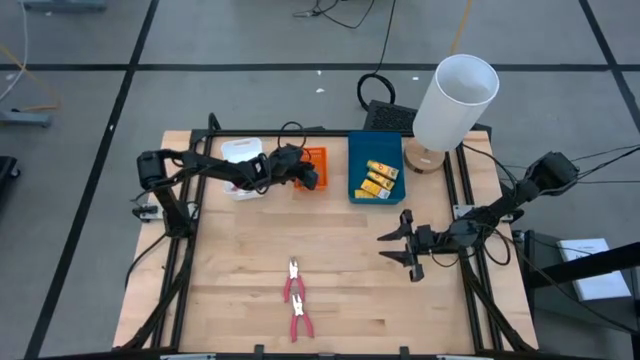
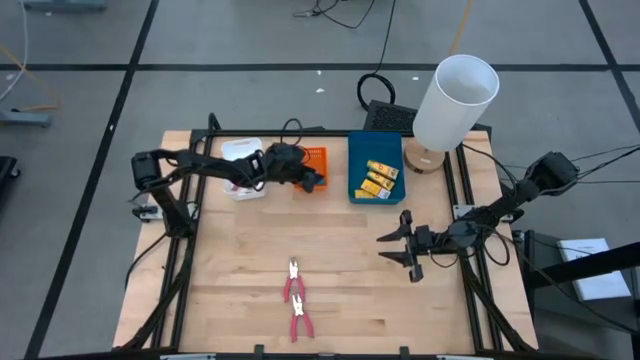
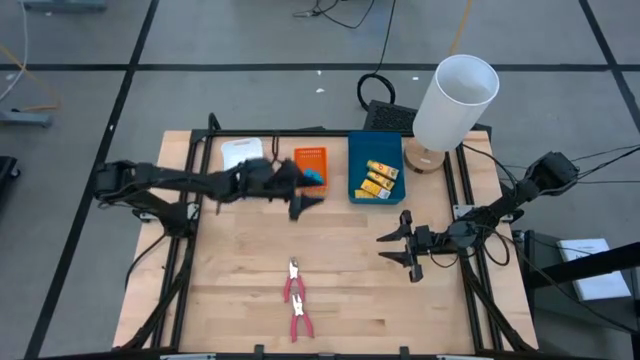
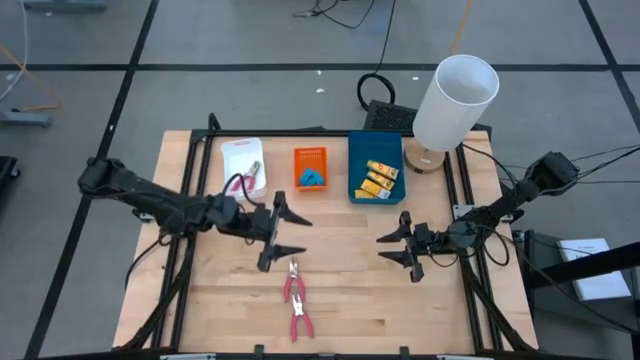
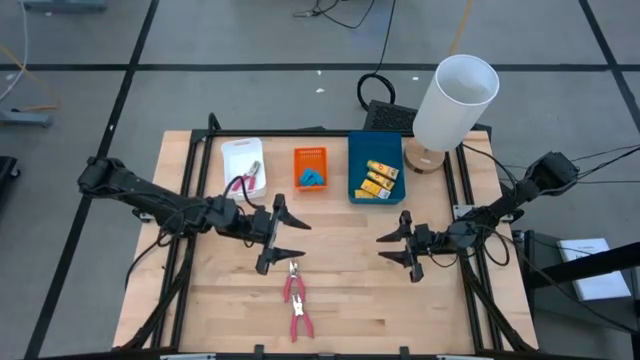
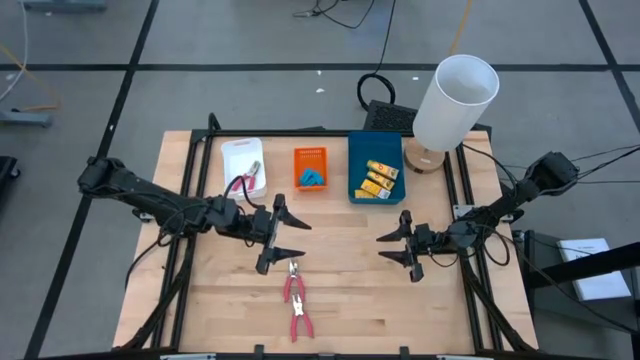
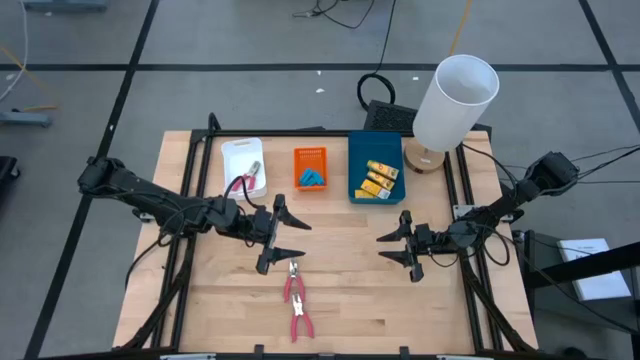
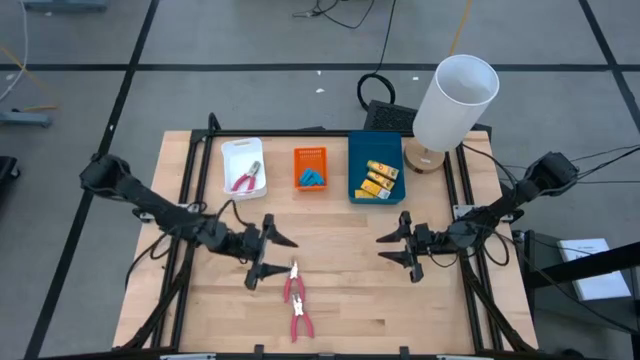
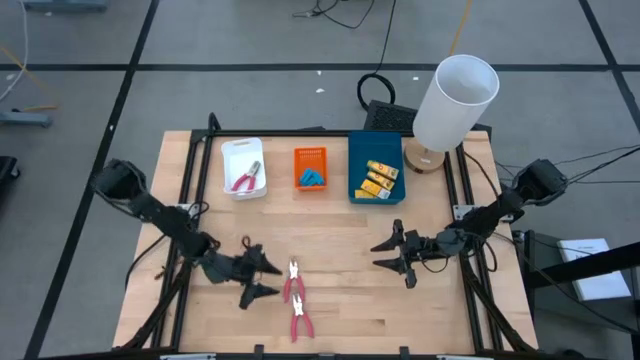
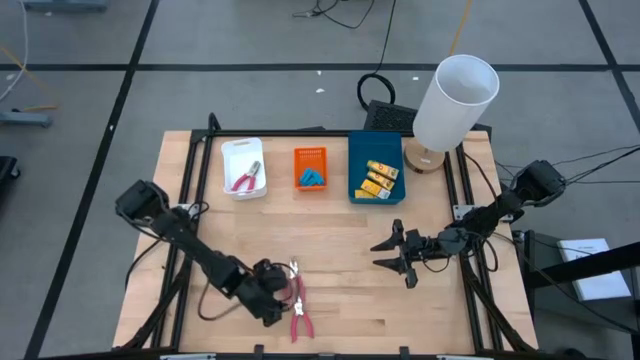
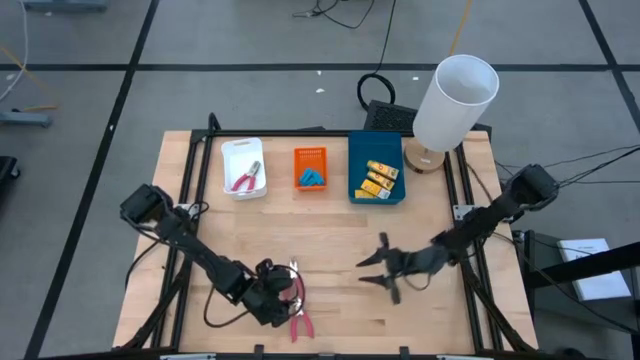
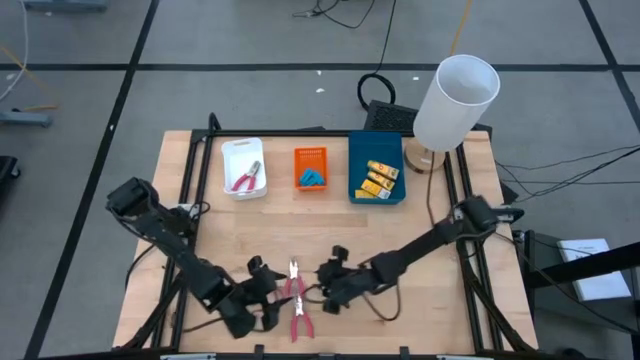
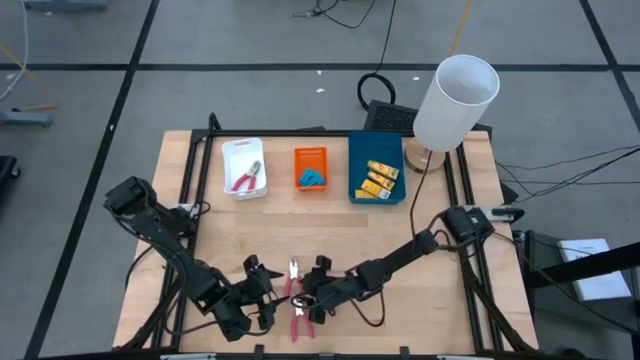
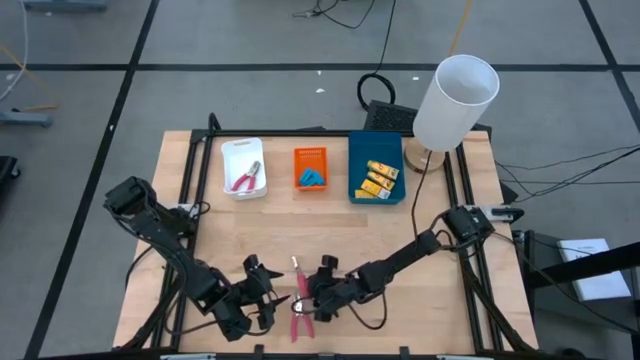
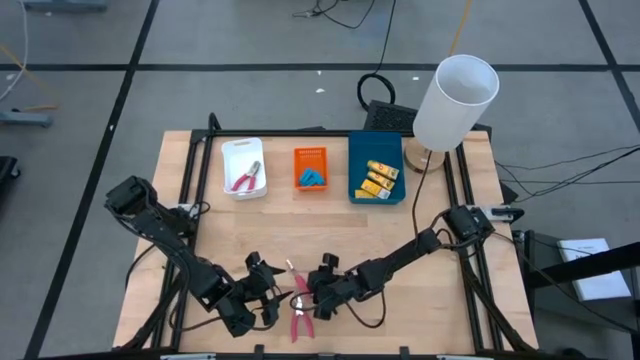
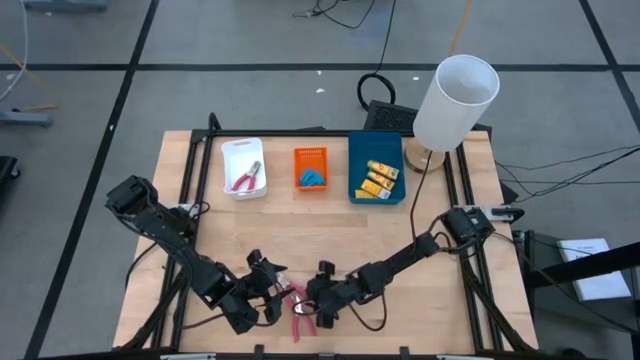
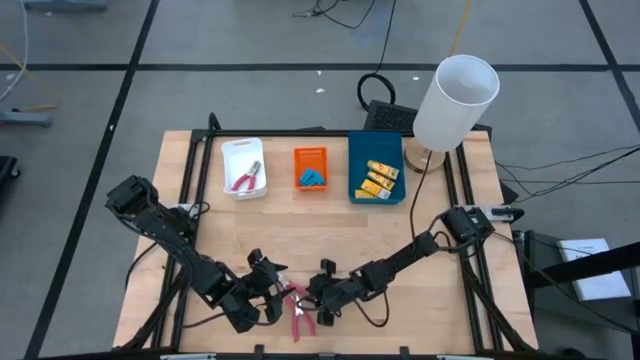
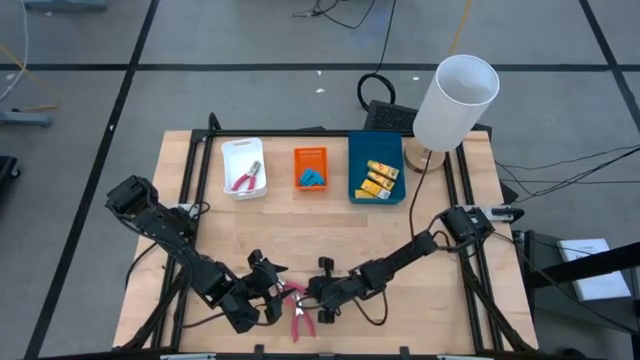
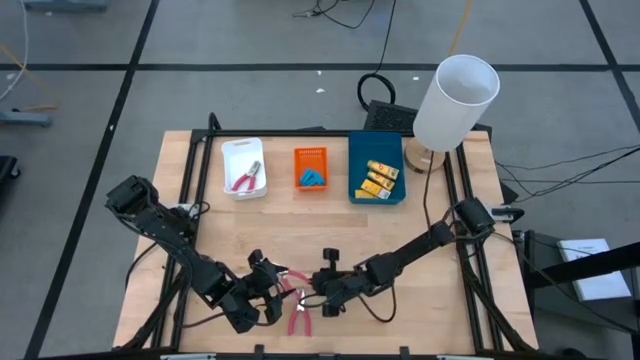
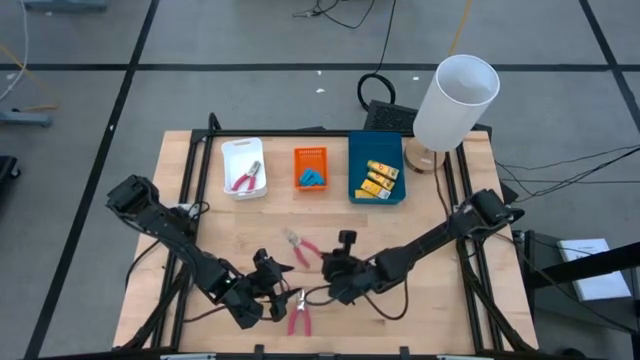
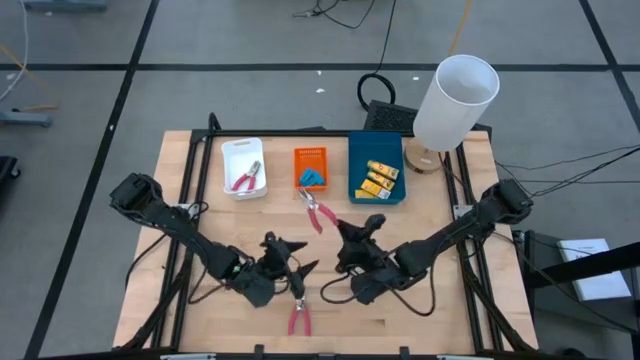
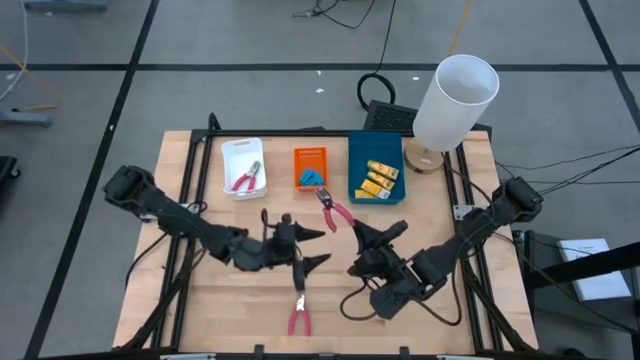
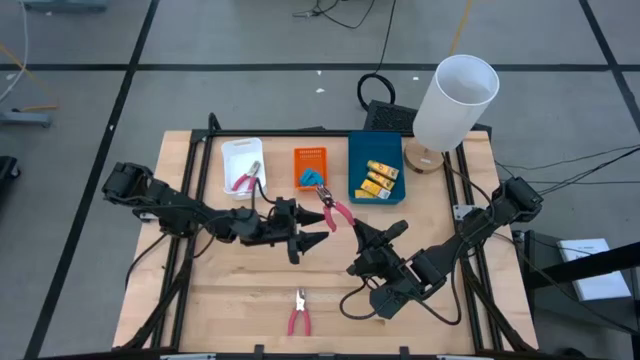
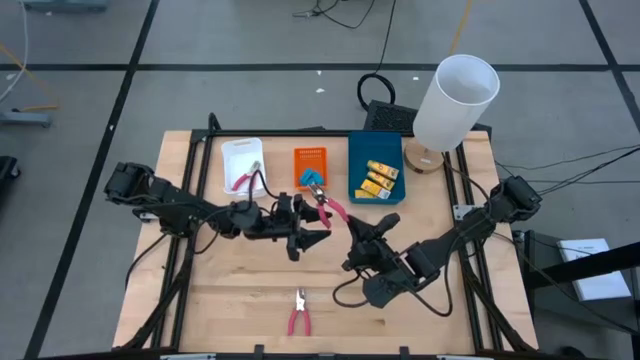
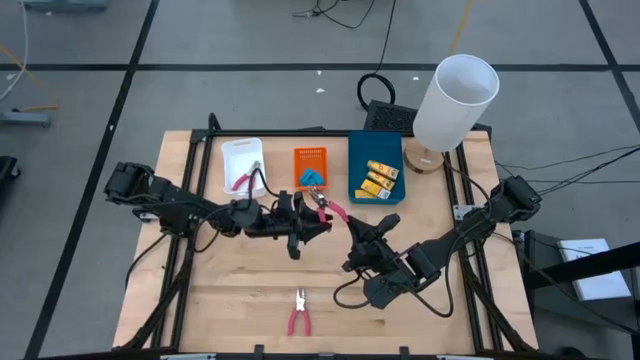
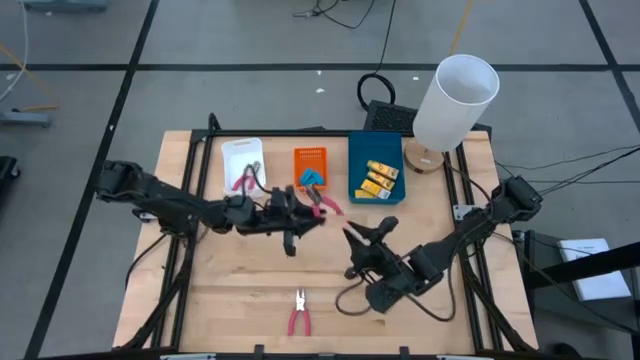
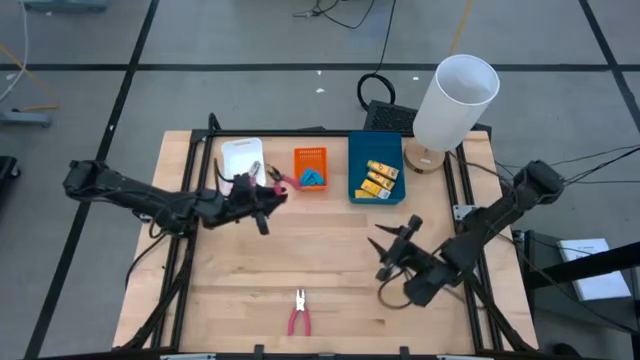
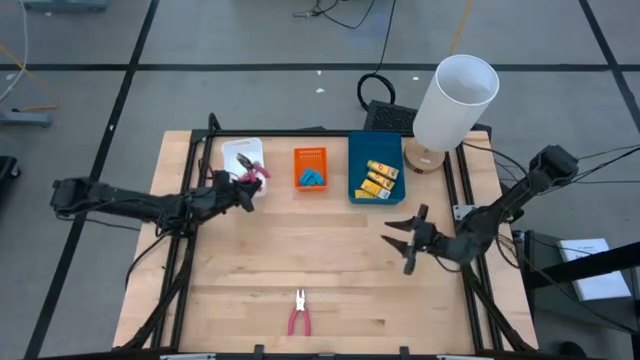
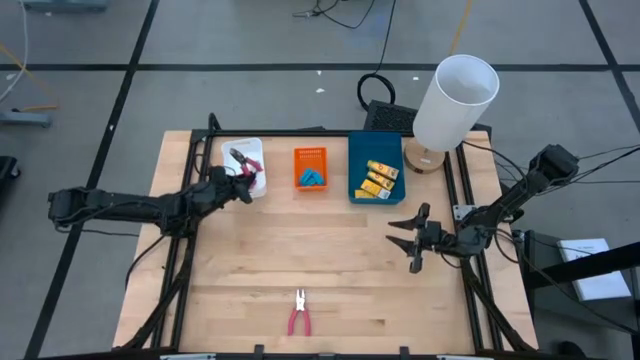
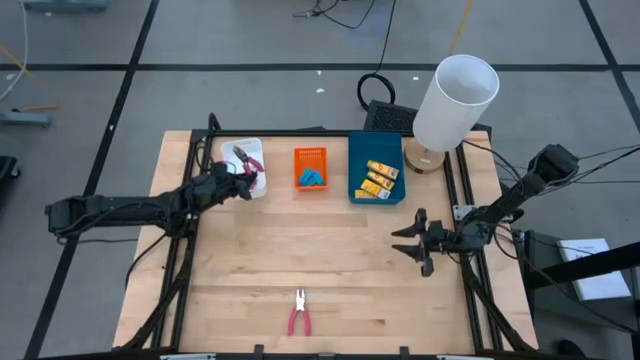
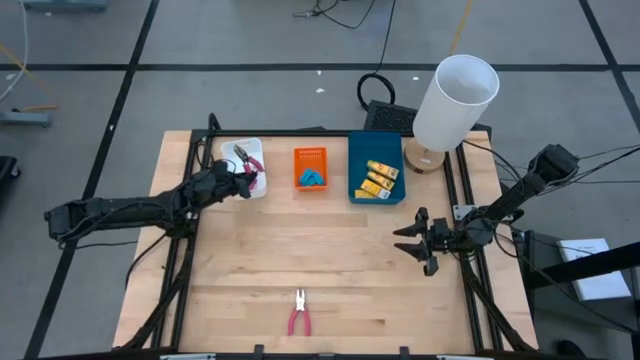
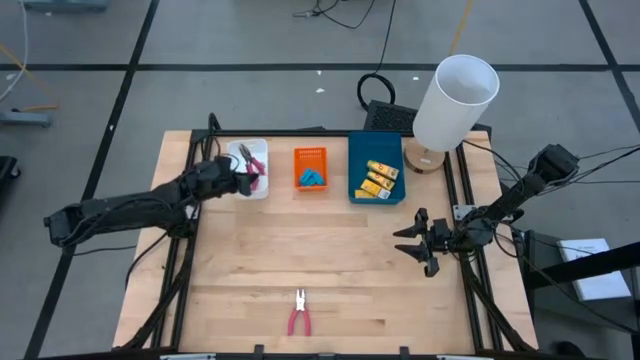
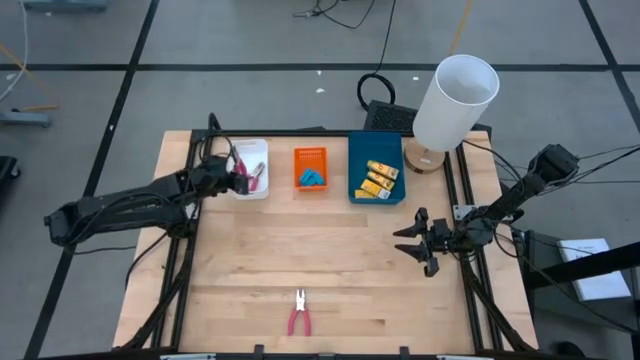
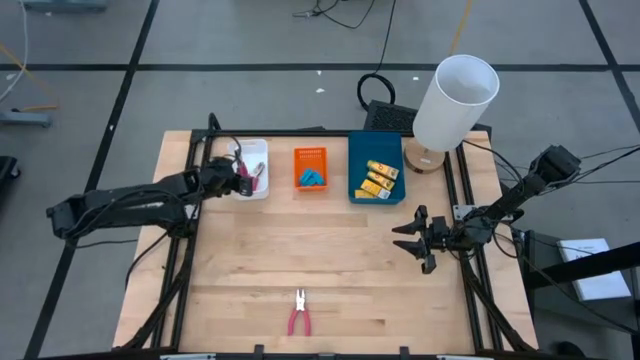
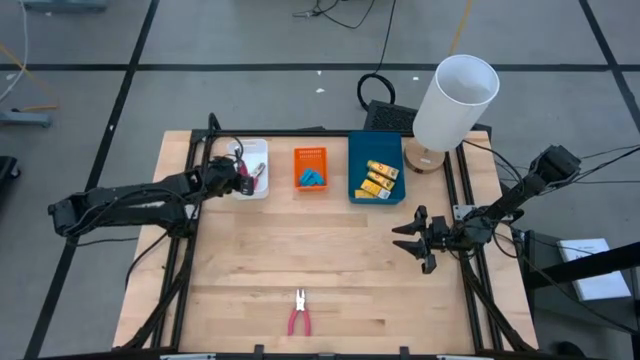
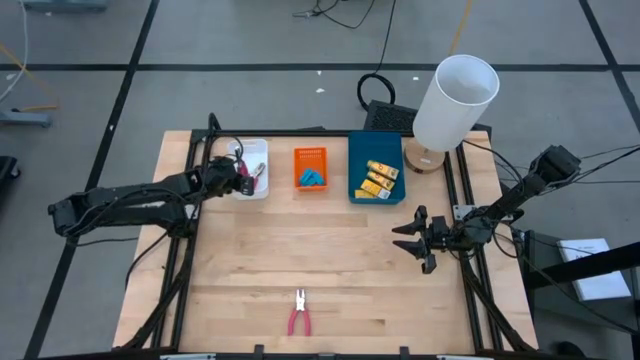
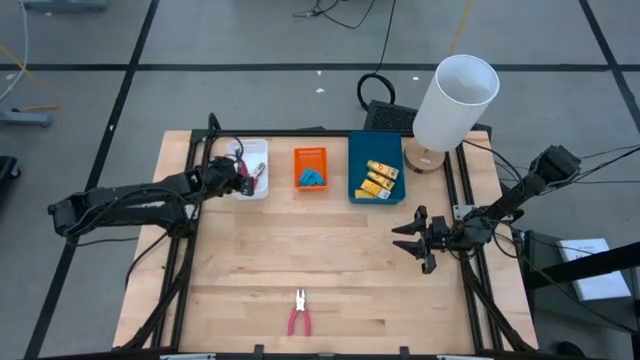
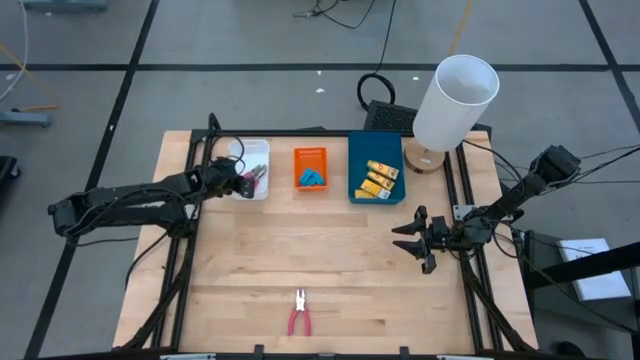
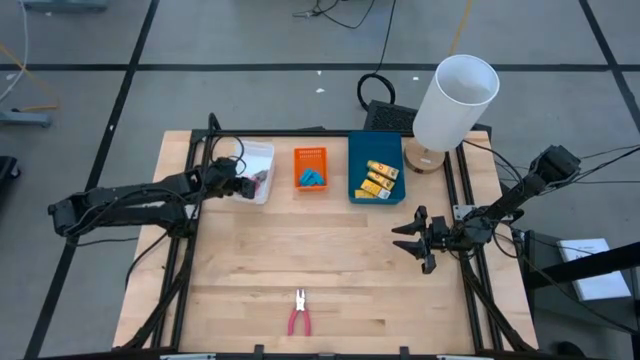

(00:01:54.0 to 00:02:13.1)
Task: Pick & Place School Supplies
Put the ticket punch into the white bin

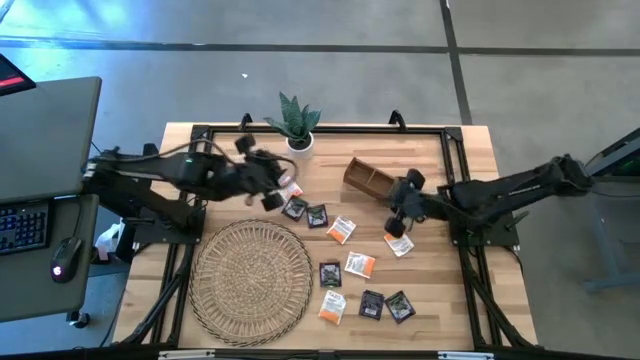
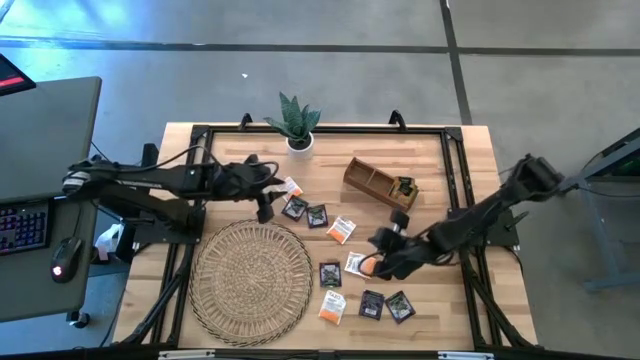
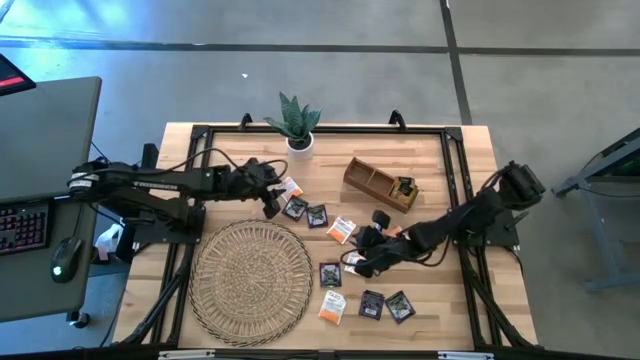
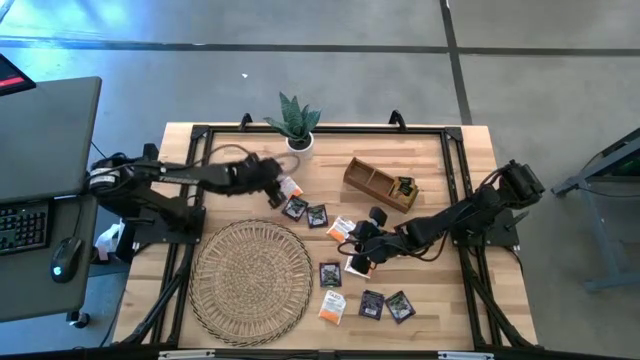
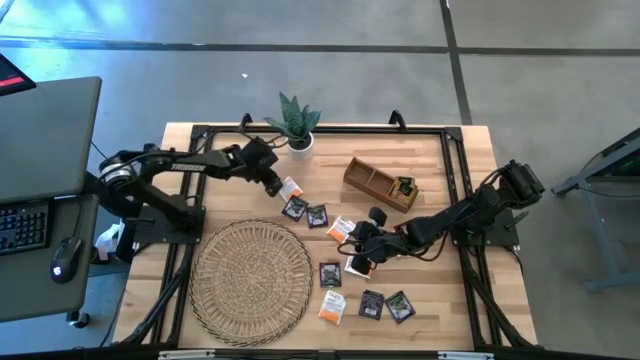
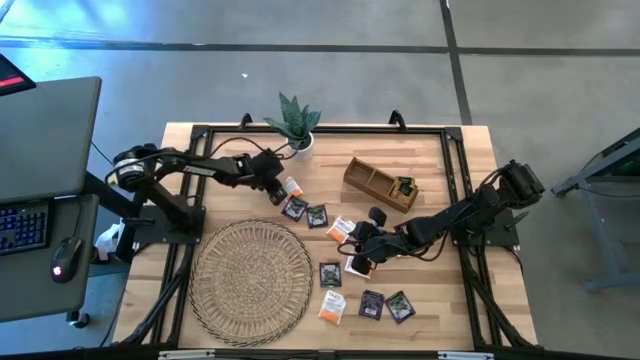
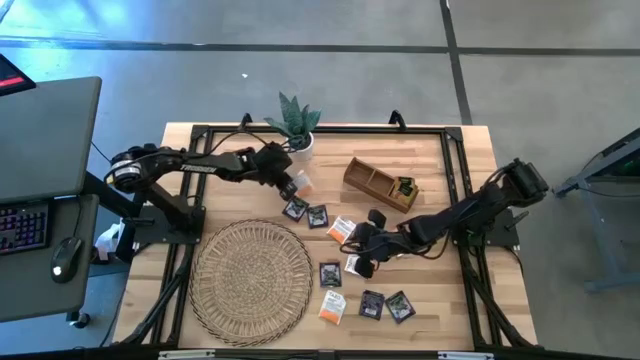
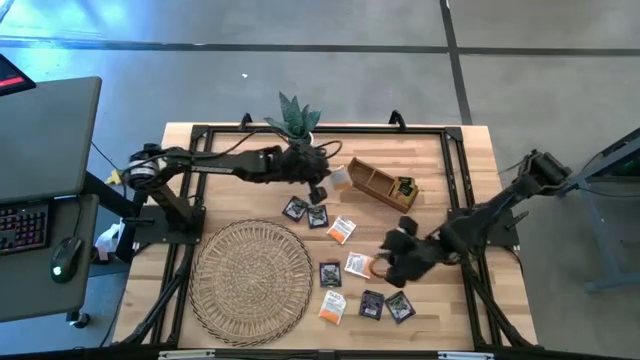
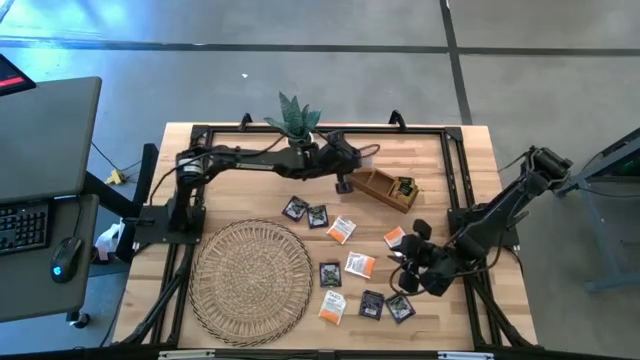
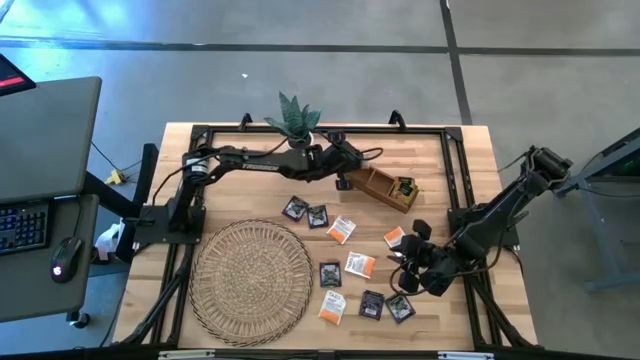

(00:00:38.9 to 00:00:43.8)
Task: Pick & Place Tea
Put the white tea bag into the left section of the wooden organizer
